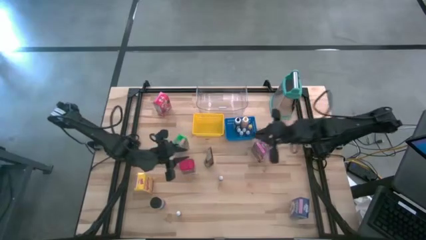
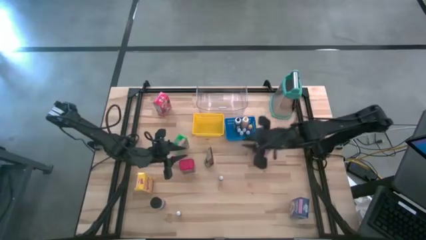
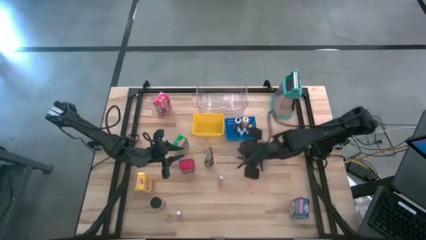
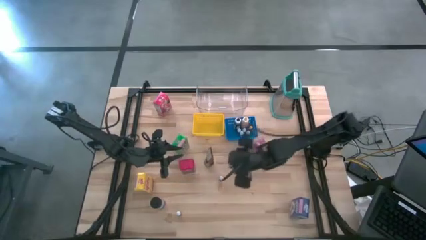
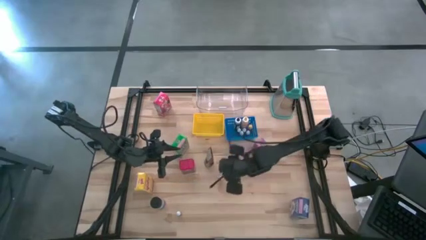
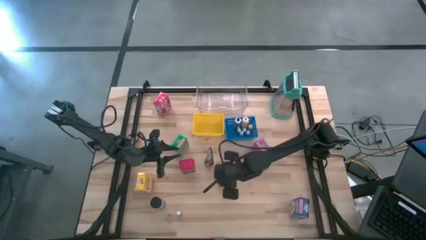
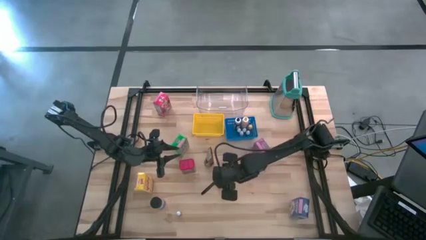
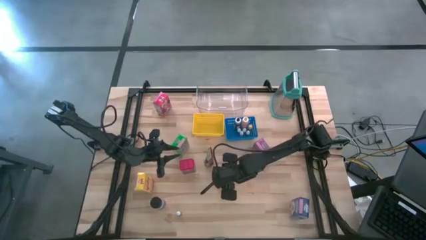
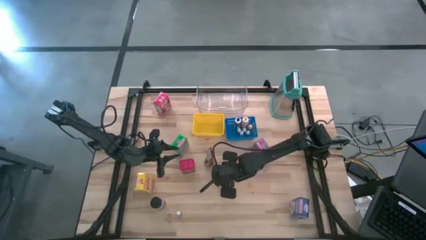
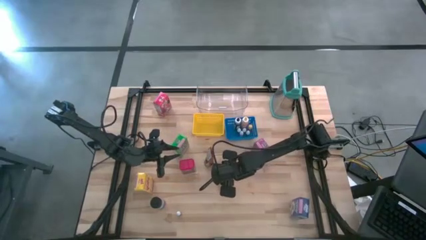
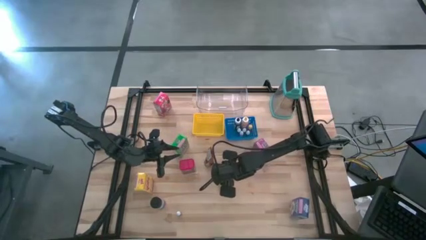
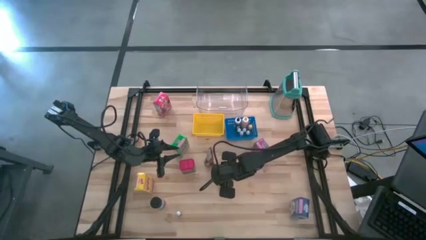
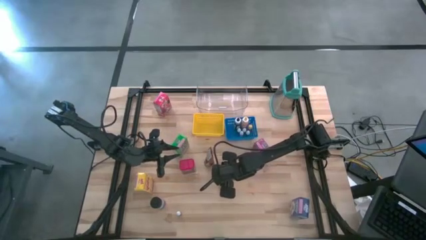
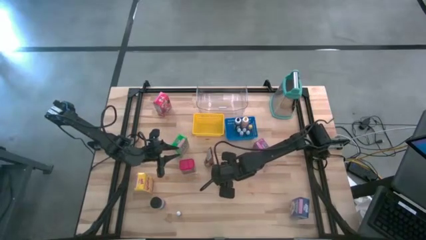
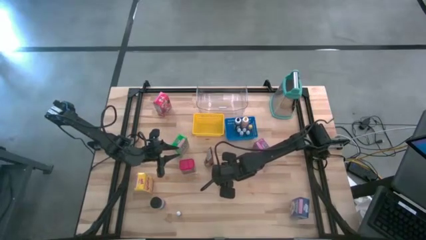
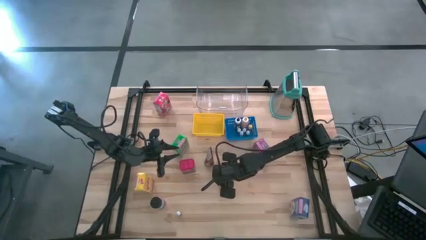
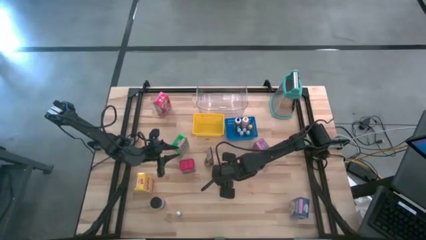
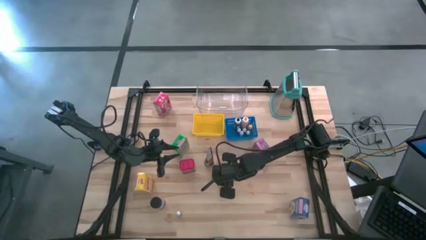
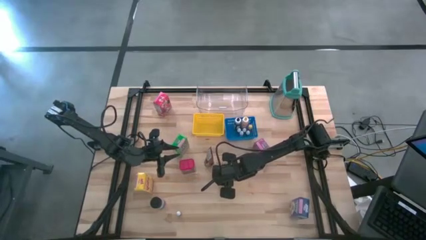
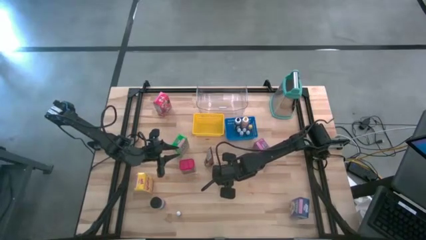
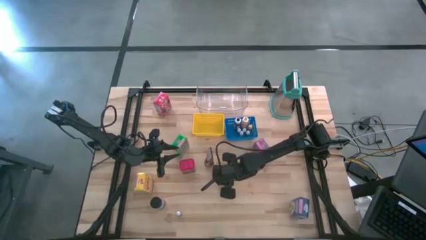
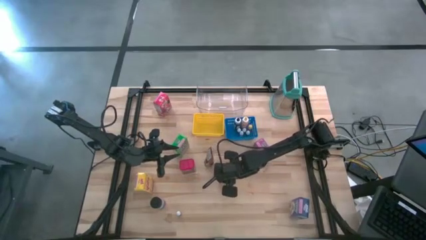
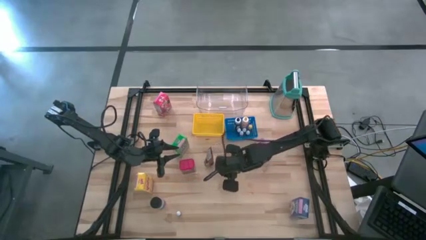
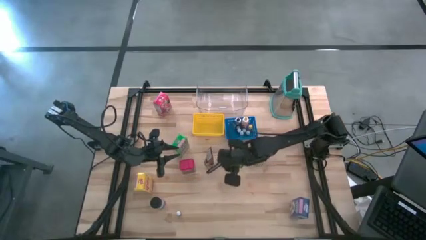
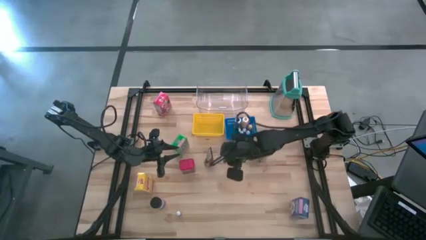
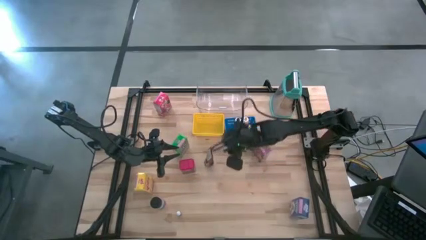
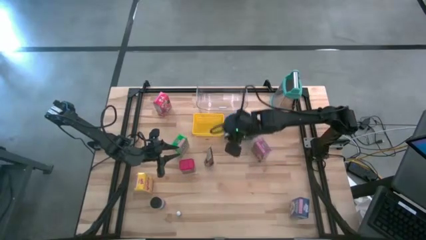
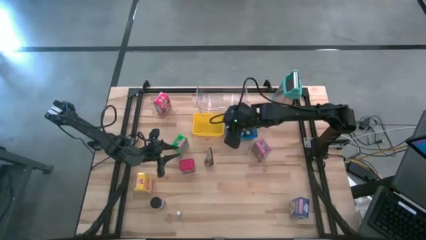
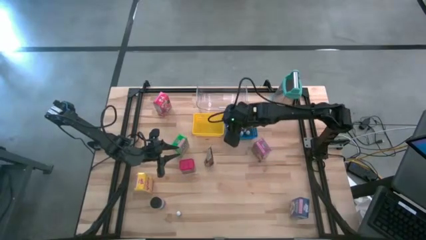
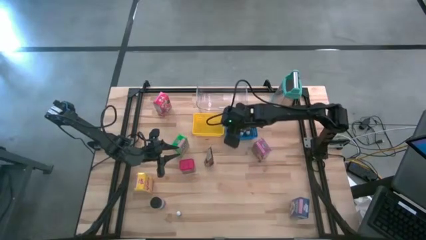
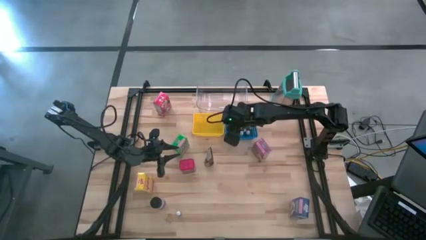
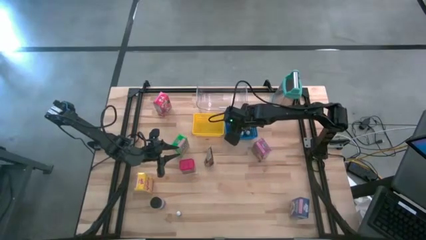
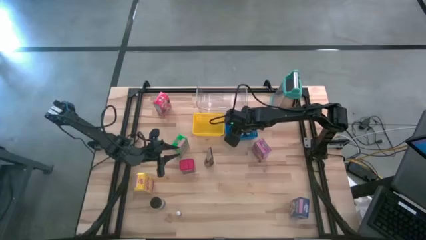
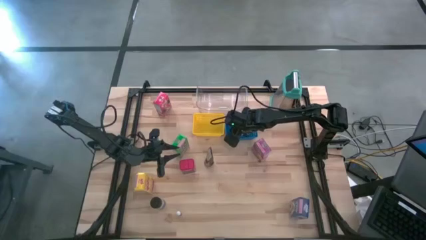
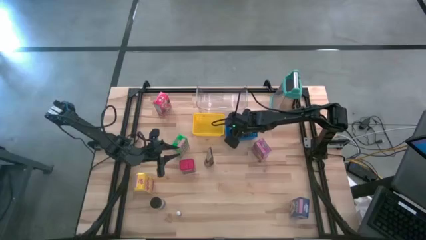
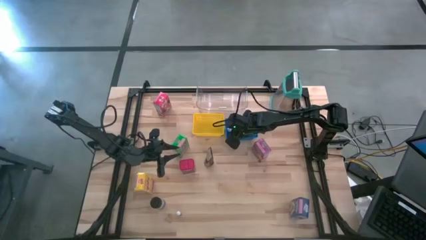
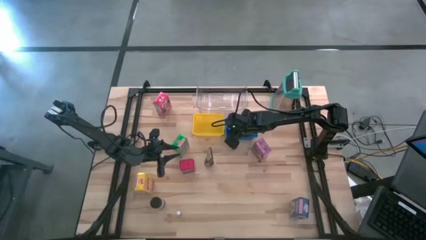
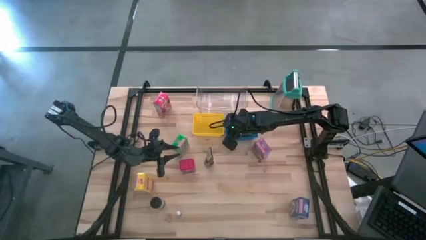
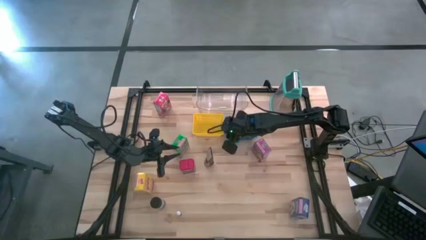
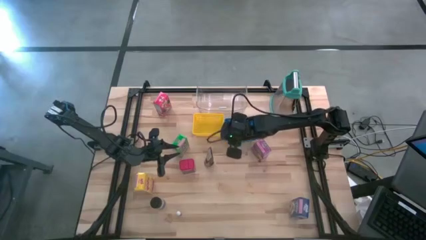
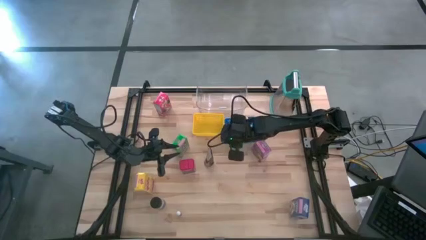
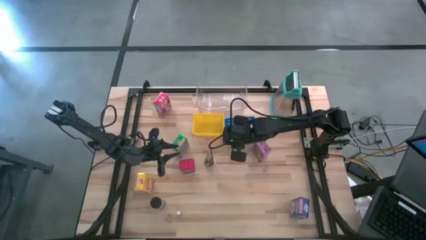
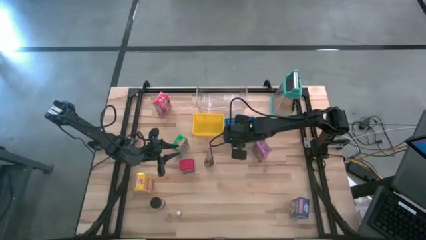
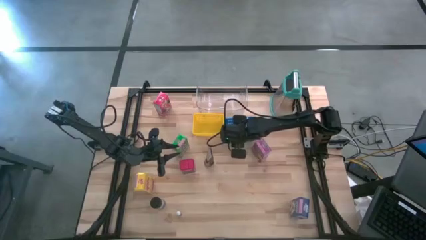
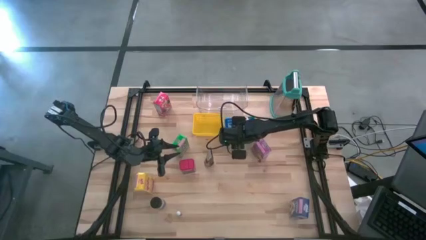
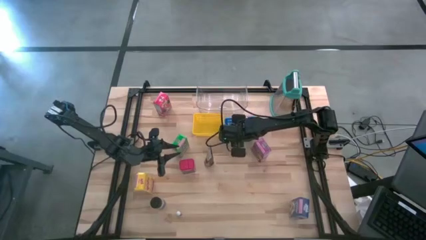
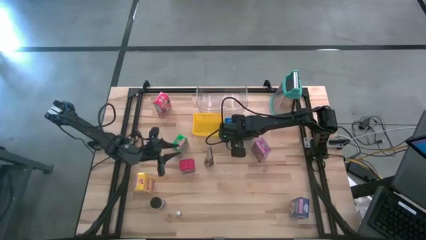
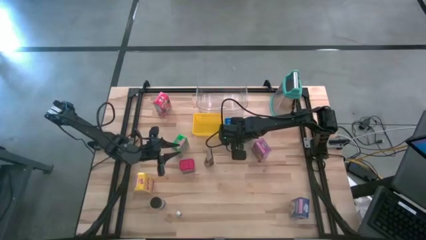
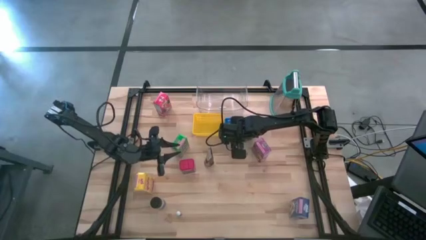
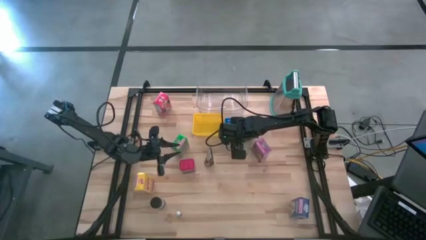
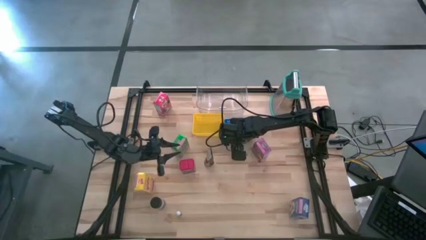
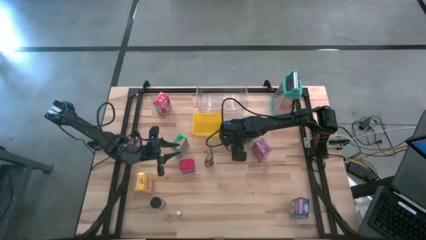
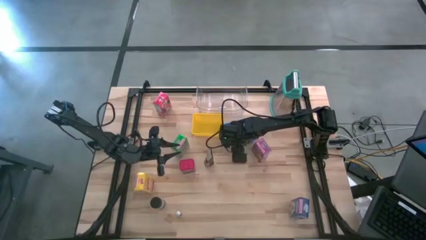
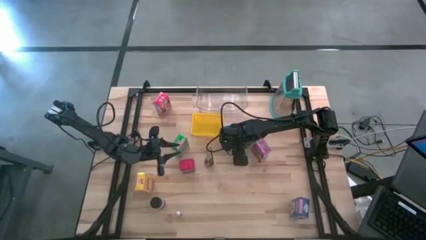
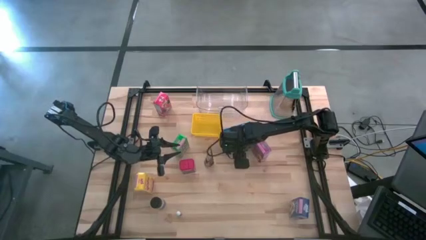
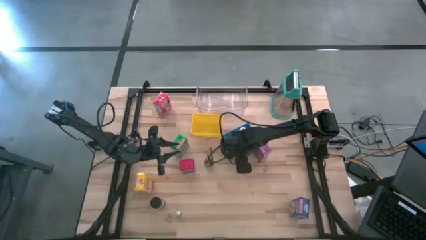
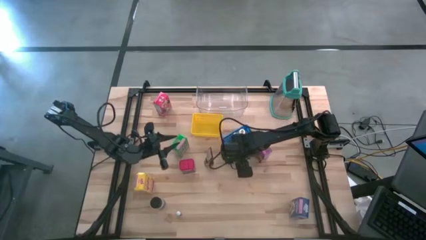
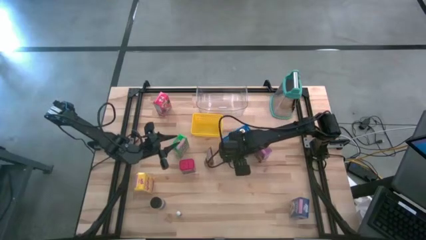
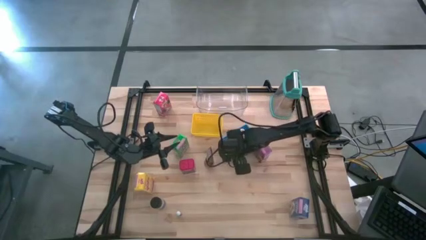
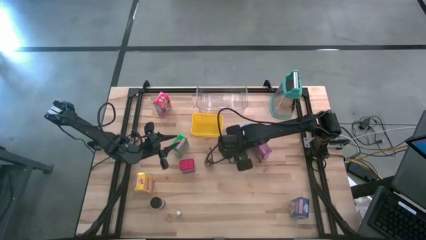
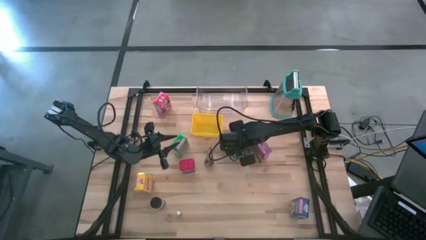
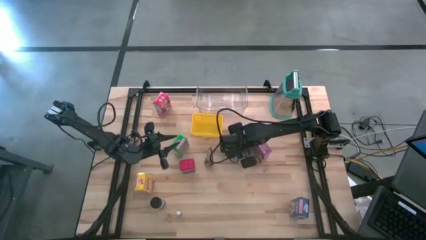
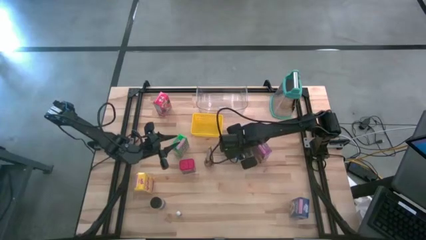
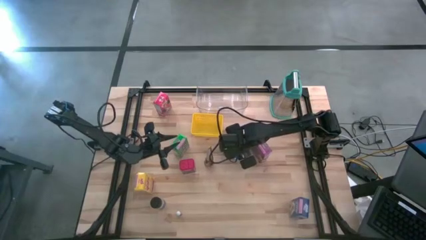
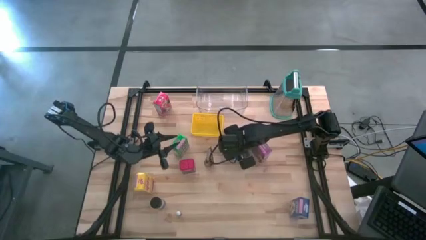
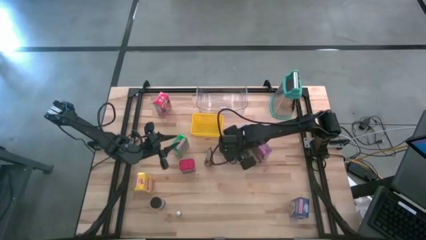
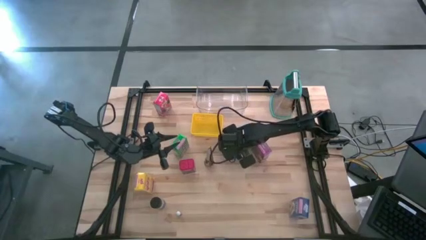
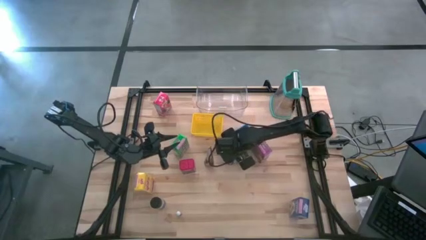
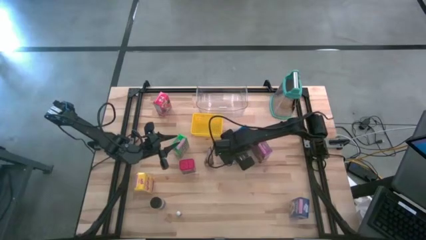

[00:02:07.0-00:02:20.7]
Task: Pick & Place Kitchen Items
Put the orange food coloring bottle into the blue bin
